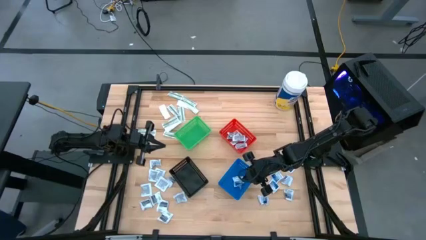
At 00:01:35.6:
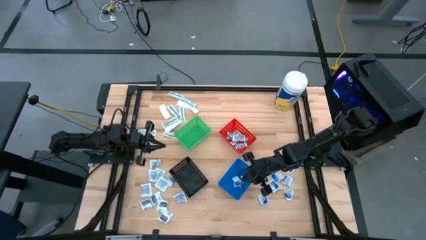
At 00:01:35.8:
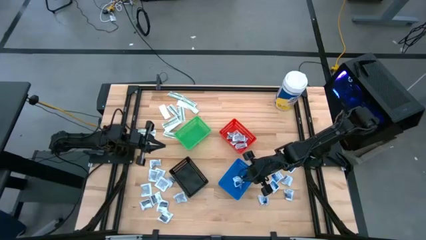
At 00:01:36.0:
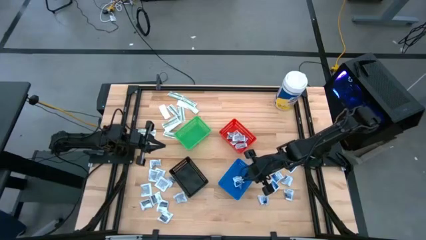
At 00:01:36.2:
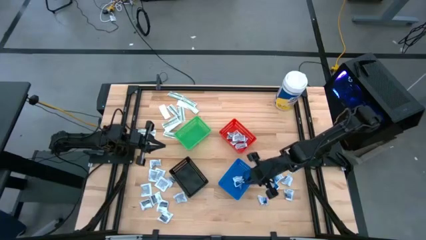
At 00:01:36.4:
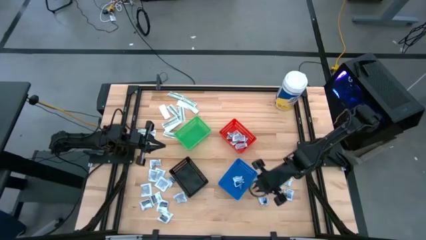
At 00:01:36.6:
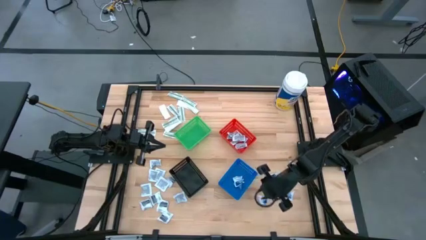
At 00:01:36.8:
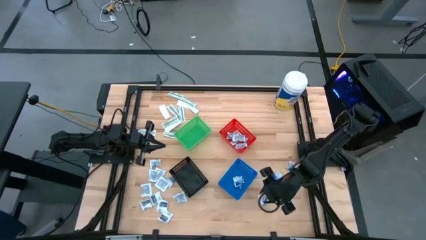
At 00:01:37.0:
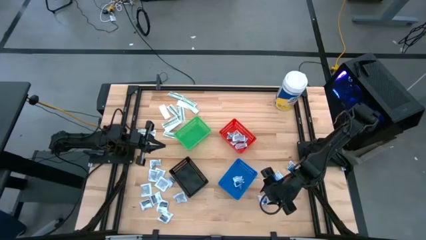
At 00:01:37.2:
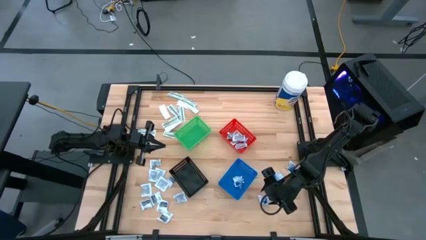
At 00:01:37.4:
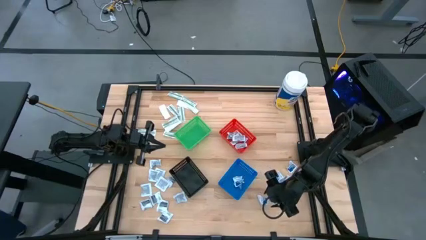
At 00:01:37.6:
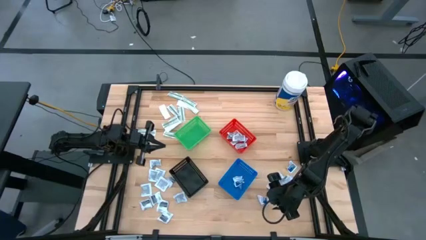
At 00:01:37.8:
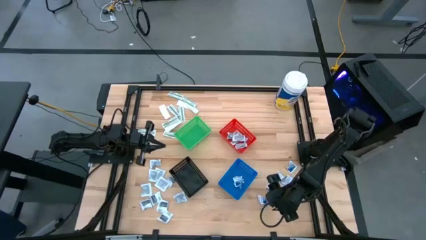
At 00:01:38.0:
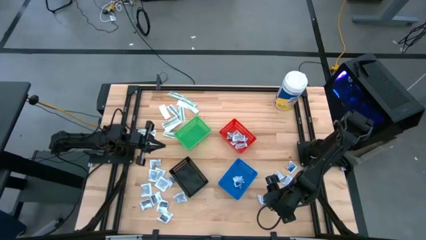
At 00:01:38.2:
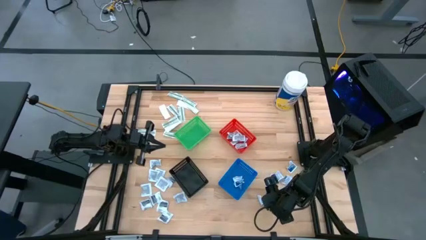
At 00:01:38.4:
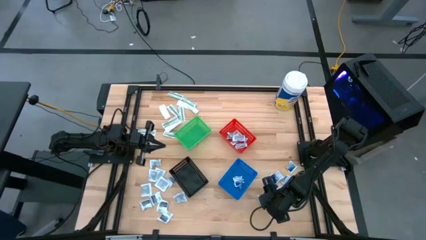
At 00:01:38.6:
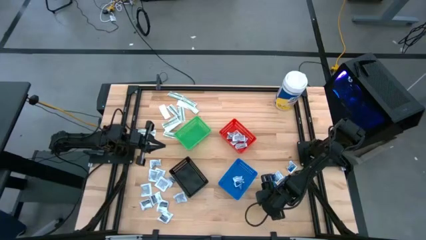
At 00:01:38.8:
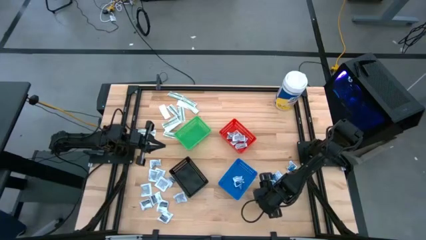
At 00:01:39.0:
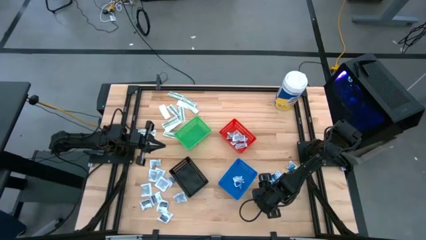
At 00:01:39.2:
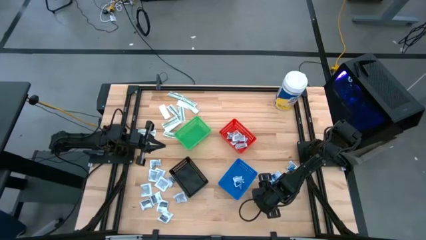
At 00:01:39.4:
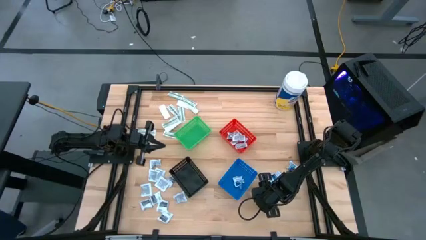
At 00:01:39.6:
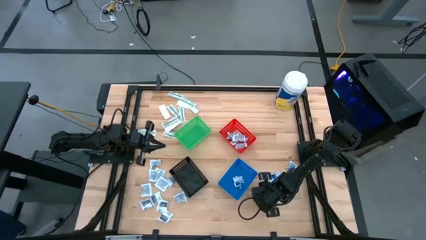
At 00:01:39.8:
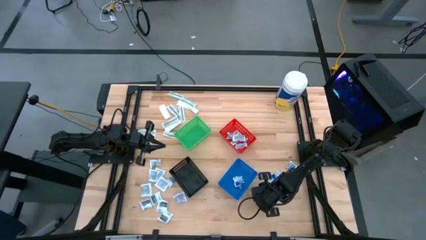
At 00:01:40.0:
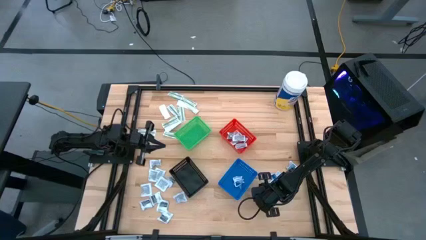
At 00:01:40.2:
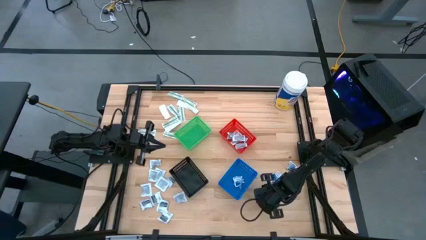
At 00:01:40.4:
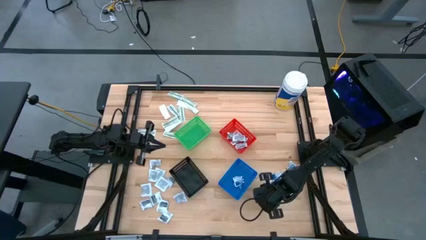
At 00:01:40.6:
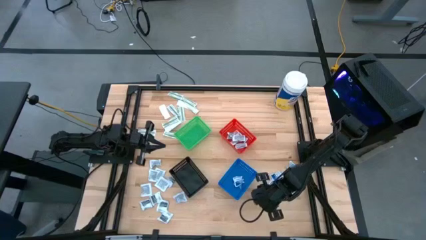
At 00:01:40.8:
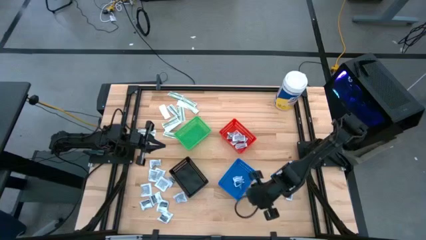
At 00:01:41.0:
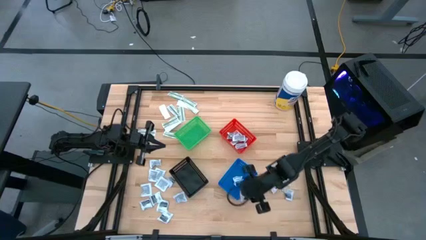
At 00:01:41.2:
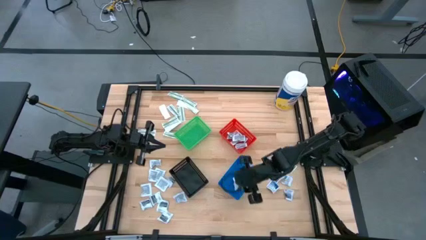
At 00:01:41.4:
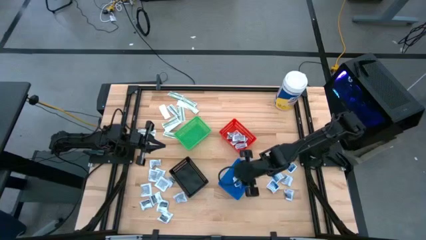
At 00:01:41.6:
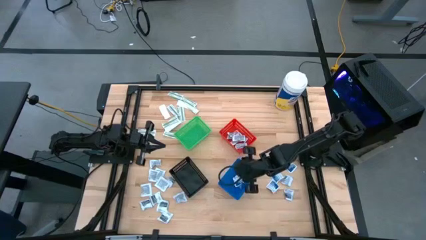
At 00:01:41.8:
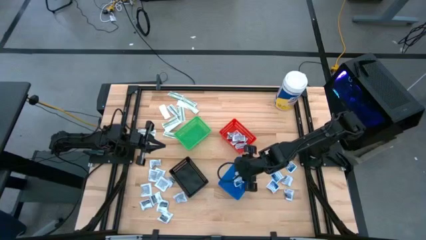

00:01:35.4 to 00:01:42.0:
Task: Pick & Place First Aid Supplies
Put the blue alcohol pad into the blue bin

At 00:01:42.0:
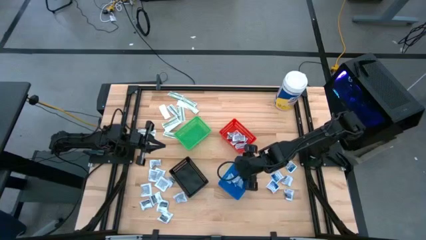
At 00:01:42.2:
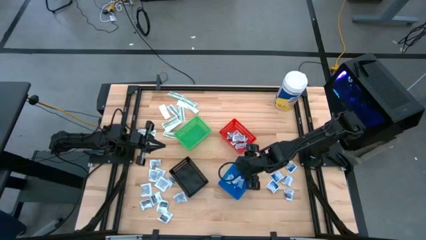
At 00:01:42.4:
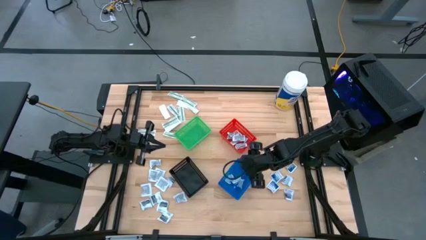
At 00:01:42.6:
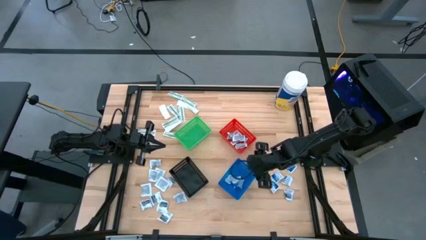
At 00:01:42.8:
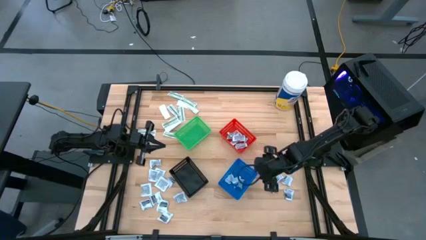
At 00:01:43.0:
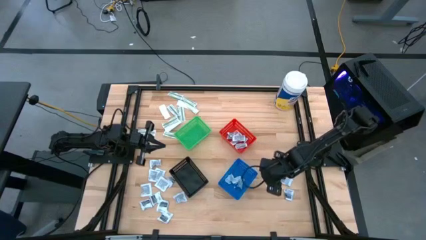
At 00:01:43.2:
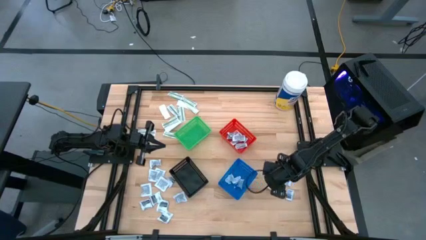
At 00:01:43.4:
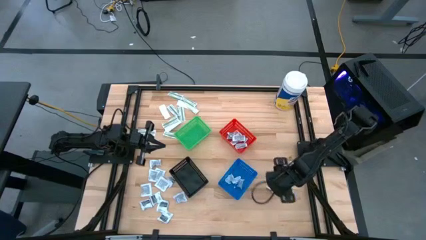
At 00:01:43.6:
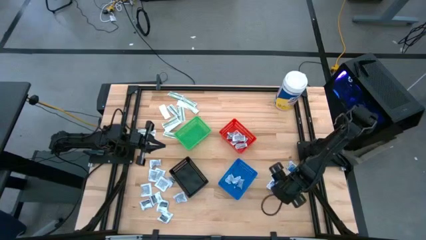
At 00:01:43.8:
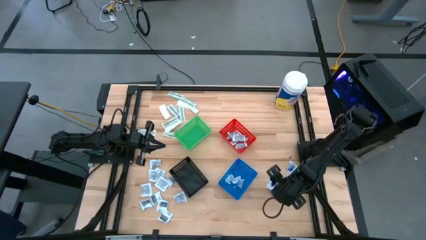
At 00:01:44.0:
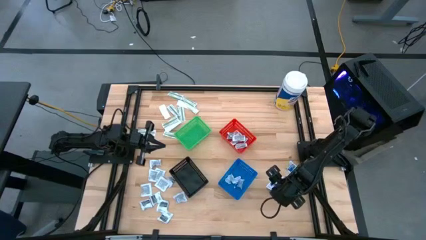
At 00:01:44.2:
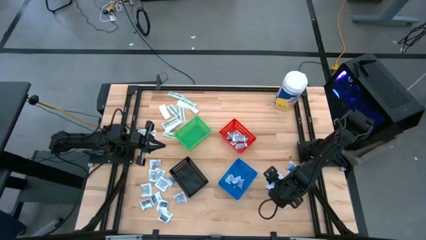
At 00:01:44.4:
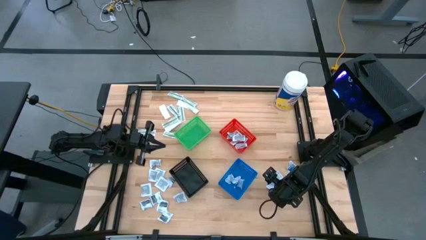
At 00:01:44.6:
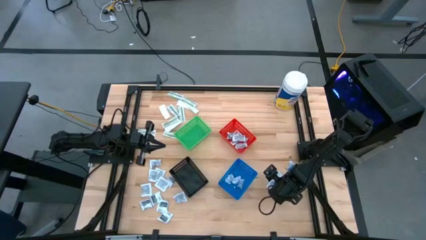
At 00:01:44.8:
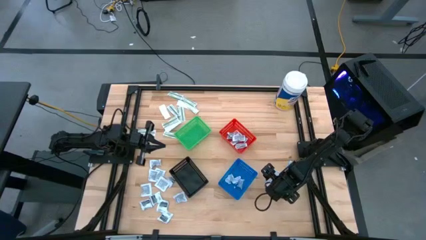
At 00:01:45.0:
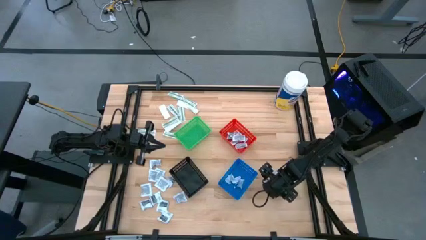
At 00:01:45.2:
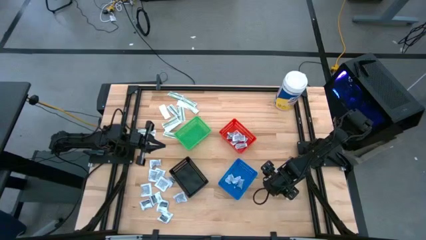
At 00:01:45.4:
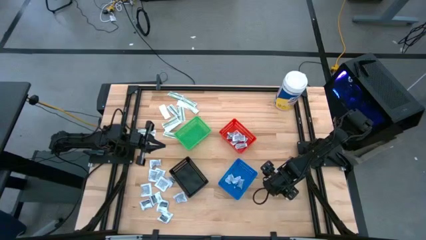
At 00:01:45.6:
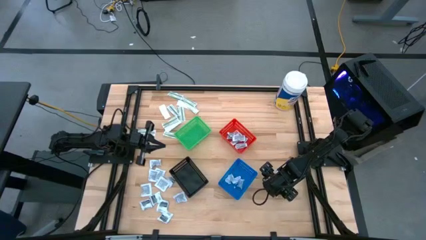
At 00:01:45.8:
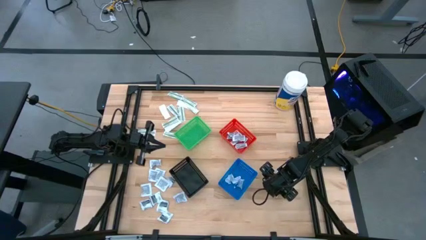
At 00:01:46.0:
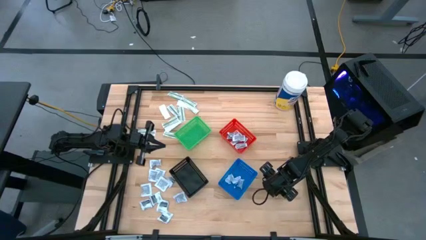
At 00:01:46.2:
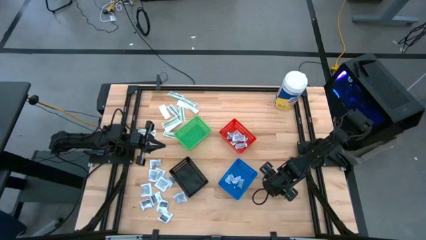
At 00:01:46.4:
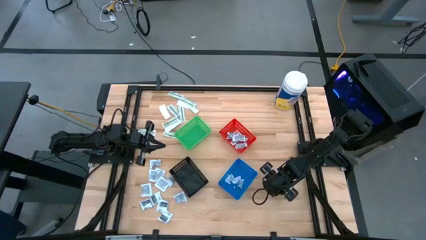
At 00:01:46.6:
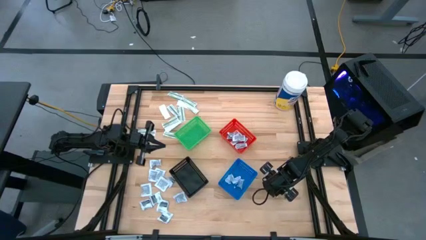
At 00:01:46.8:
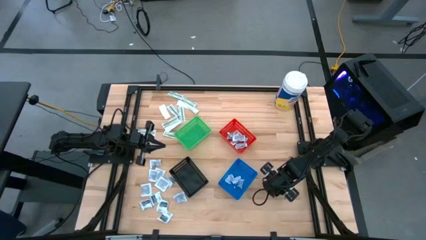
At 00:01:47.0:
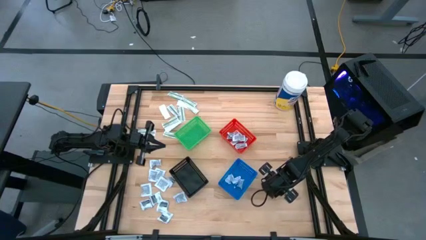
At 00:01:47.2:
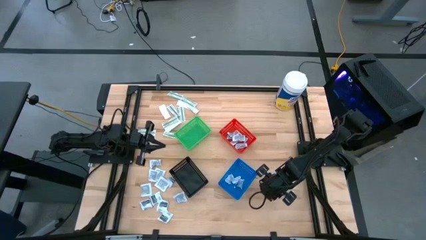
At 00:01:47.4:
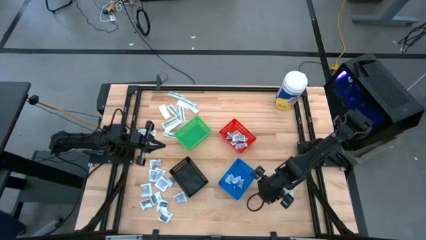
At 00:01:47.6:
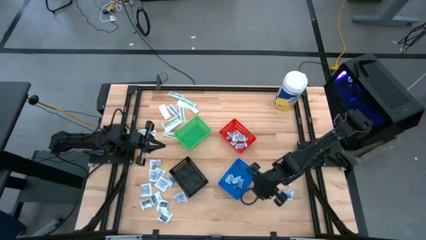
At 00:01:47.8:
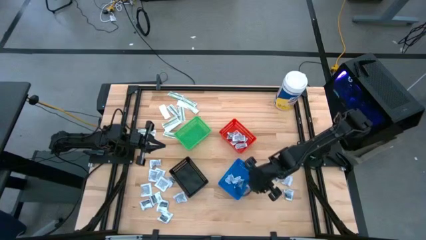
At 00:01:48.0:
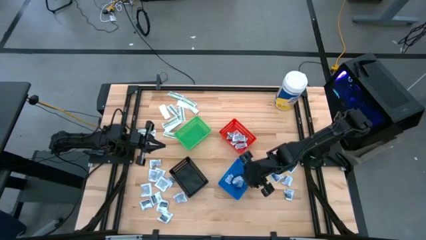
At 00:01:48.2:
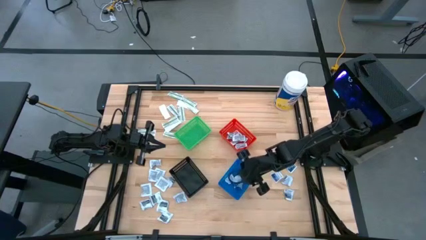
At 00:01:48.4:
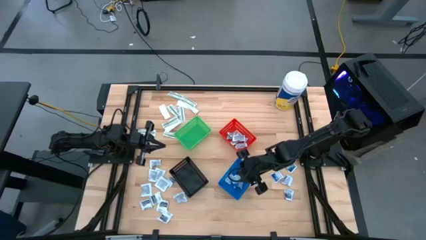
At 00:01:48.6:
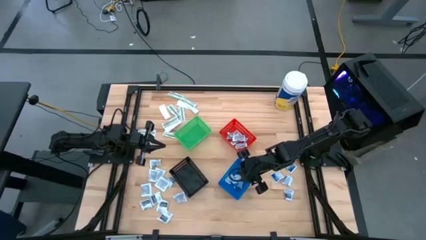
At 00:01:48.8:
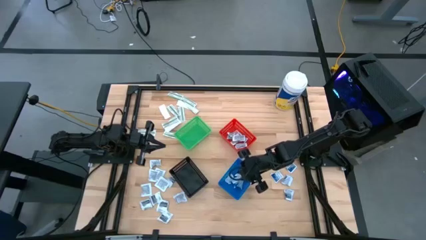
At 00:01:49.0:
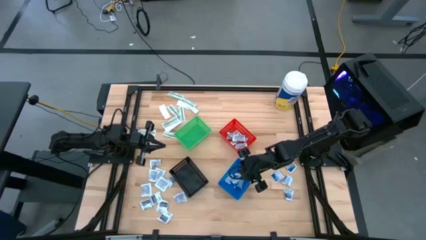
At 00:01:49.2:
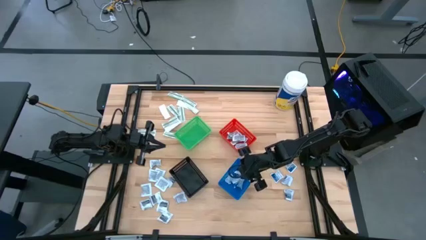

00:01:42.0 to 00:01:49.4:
Put the blue alcohol pad into the blue bin
